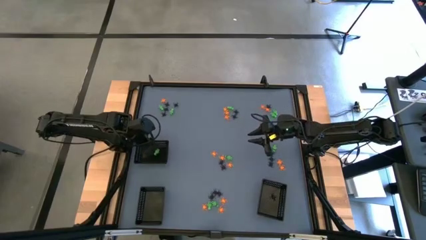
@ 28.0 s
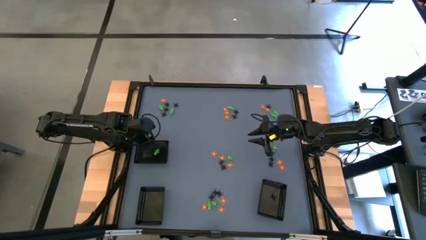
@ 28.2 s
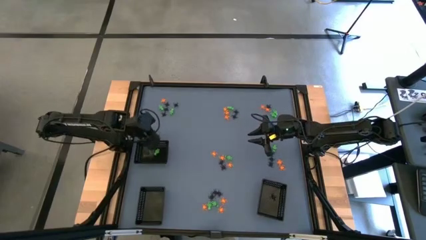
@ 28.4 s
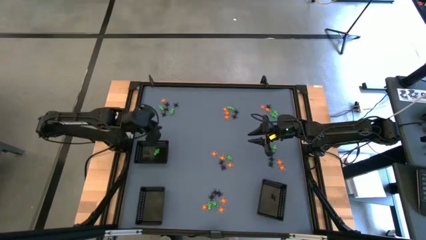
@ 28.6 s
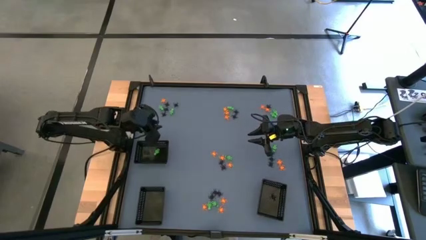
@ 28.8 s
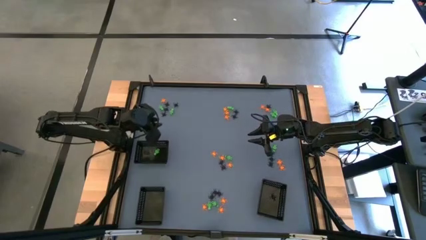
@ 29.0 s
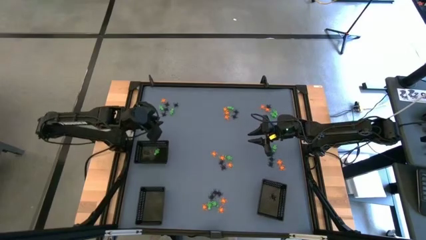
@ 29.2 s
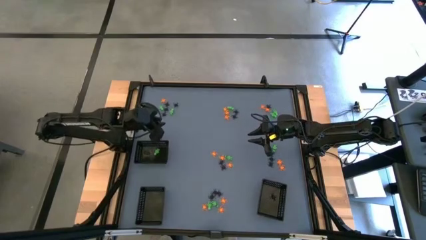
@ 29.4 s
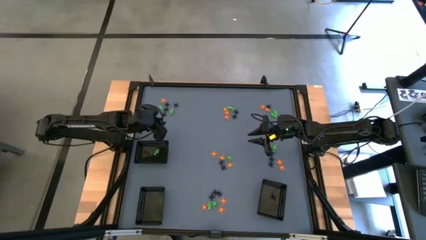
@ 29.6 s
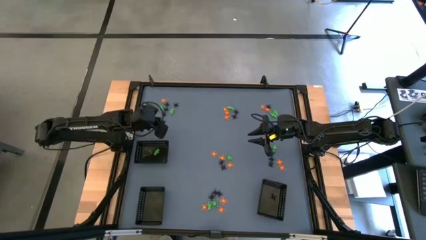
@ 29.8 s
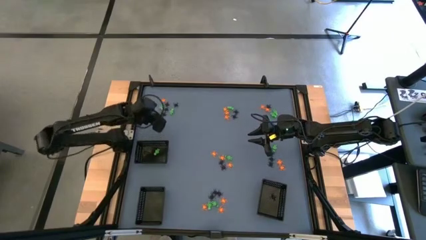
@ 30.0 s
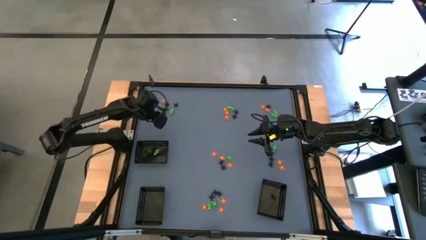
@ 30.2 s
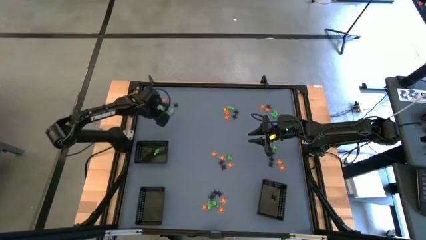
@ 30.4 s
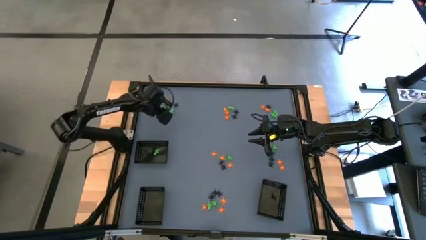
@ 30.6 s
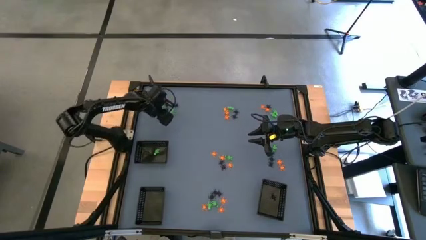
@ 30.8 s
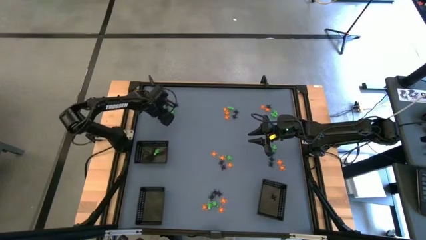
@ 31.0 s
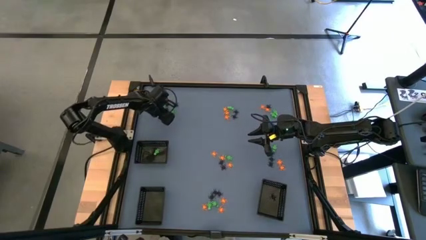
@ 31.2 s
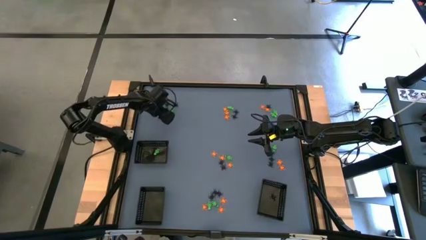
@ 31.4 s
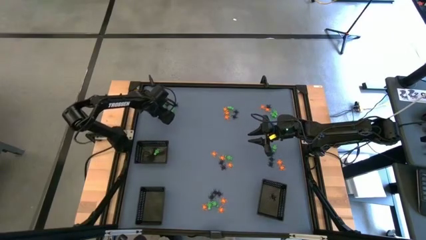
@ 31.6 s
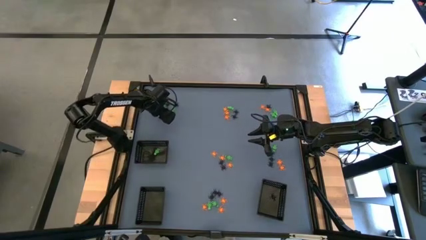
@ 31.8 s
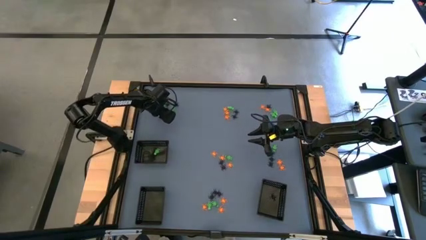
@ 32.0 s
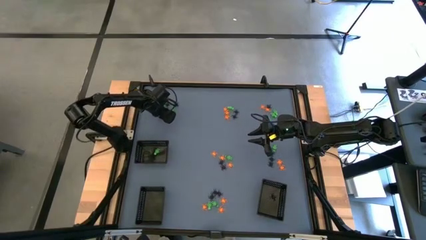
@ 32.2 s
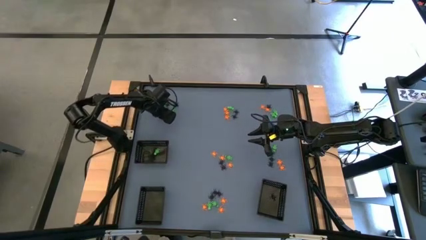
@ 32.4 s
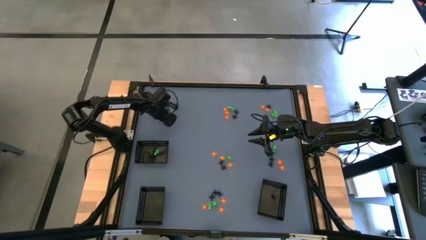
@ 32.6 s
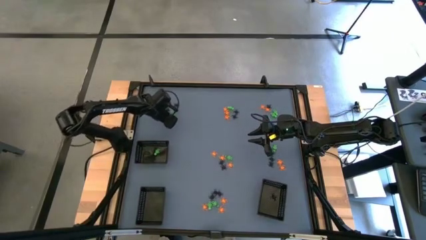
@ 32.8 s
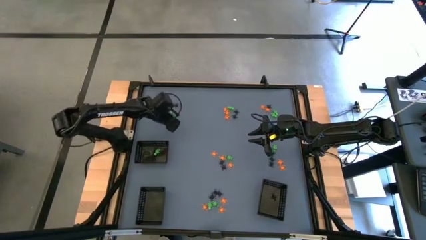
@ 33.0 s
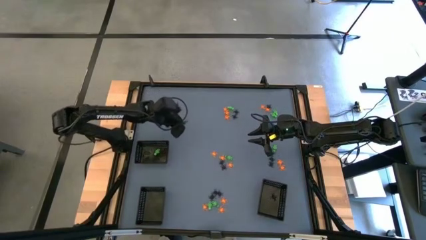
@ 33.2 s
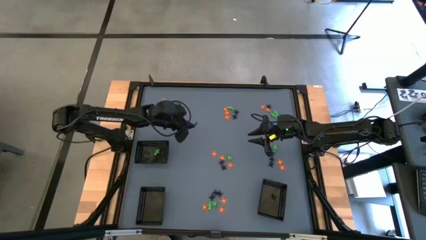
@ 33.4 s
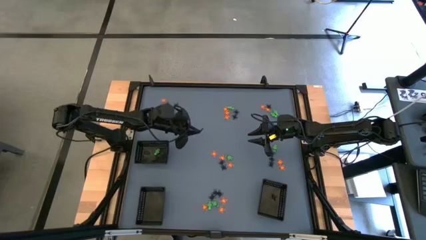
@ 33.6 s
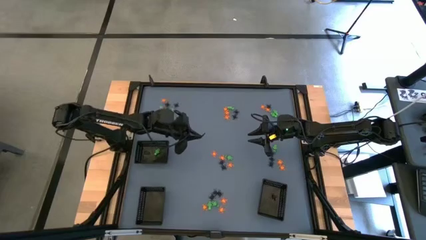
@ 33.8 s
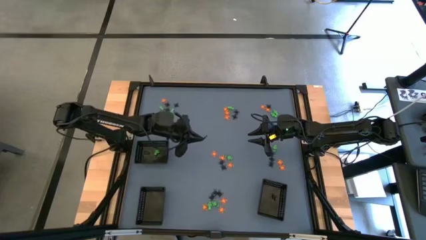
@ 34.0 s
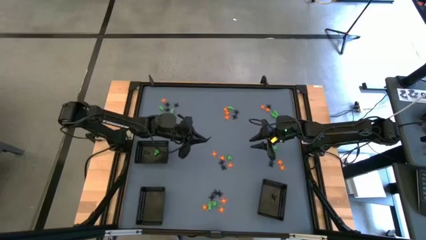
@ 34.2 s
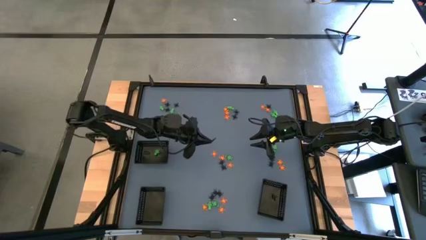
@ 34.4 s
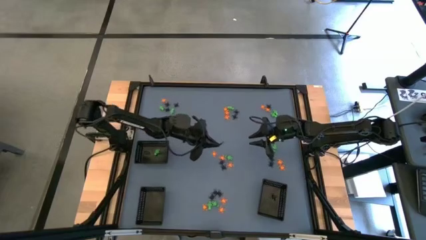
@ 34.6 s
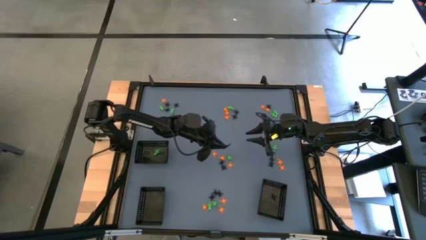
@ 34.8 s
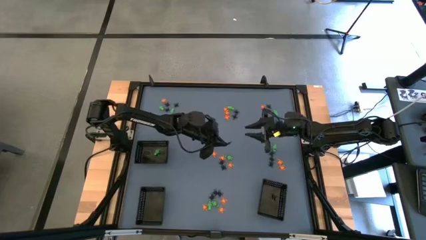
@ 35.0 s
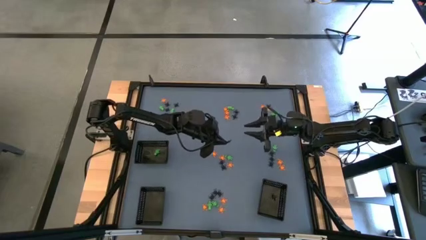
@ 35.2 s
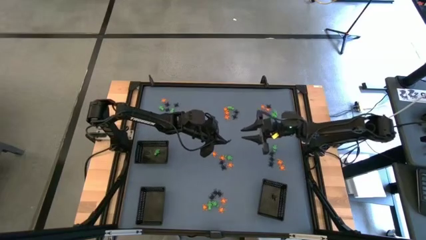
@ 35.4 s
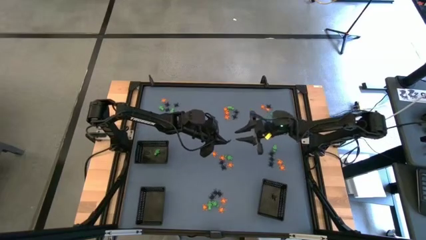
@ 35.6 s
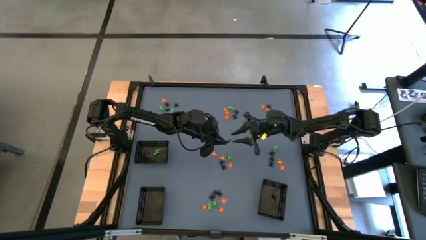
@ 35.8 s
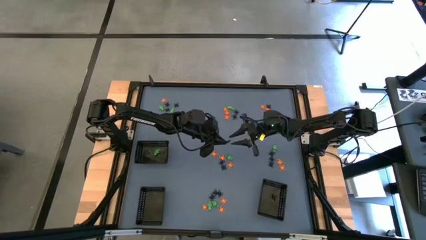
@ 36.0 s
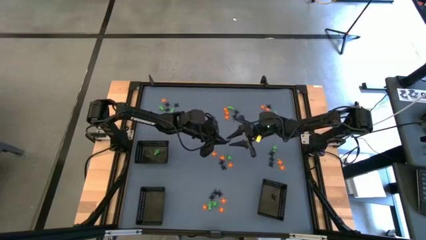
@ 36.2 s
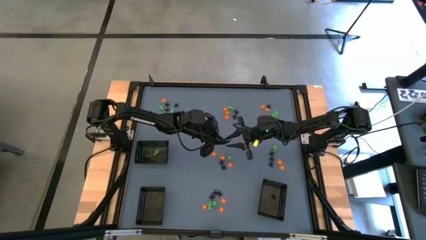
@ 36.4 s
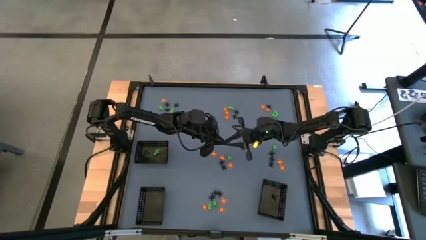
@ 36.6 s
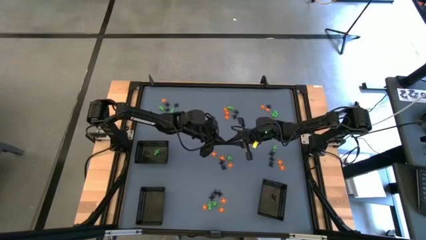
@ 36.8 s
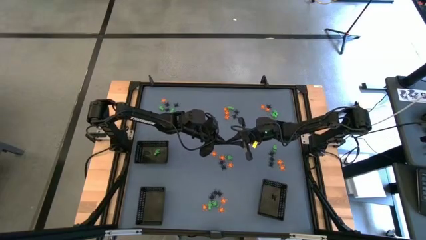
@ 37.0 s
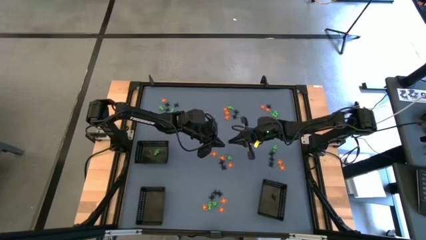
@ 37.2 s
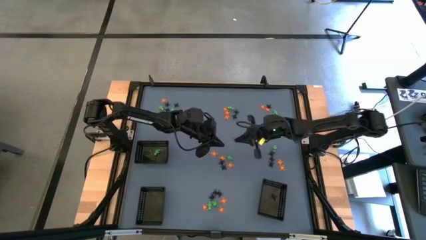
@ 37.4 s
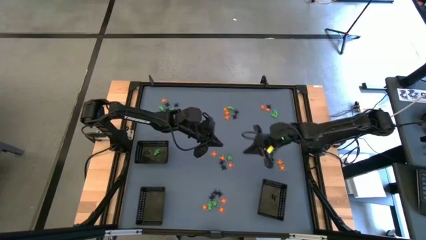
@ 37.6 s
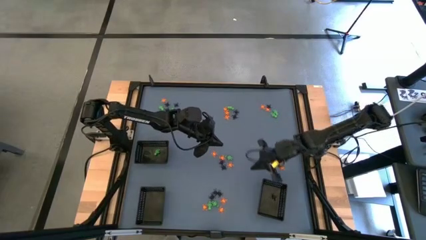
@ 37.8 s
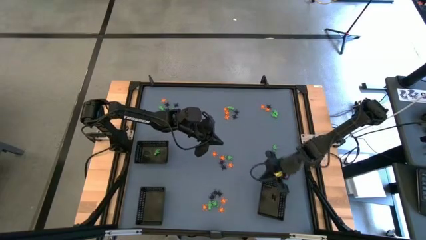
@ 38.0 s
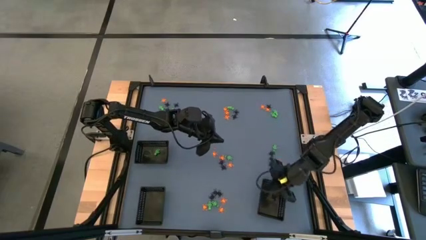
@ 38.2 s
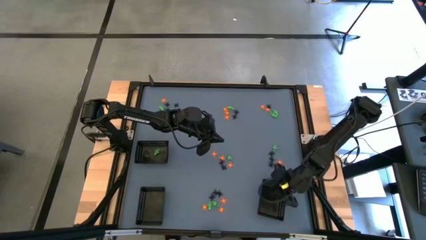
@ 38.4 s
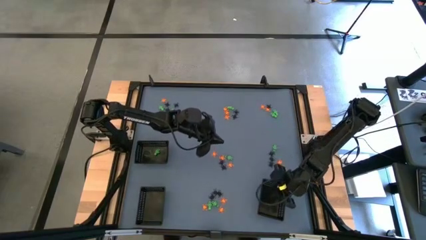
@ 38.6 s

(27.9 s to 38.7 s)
Task: Sort Halloween decoration
Put the black spider toy into the bottom right black bin

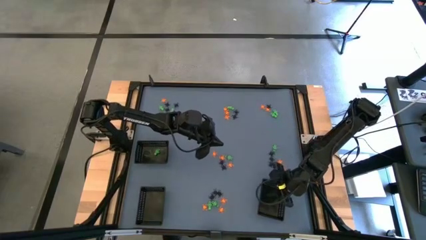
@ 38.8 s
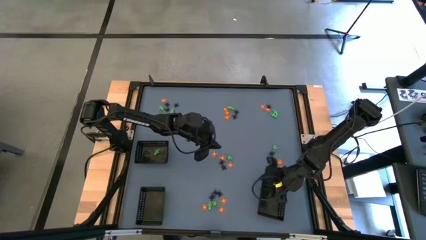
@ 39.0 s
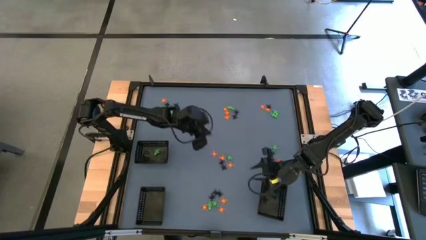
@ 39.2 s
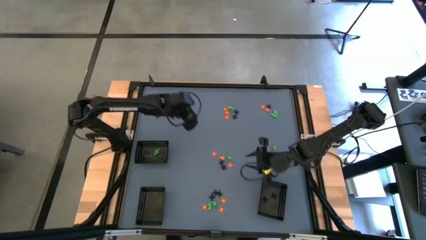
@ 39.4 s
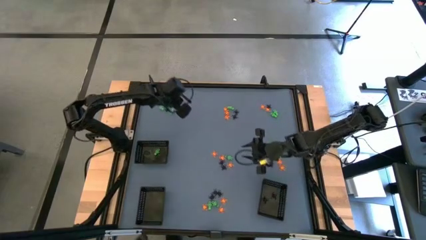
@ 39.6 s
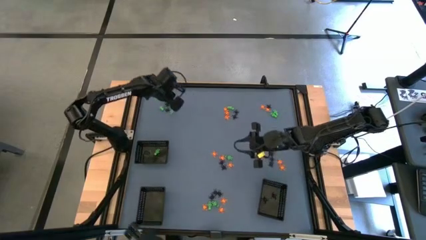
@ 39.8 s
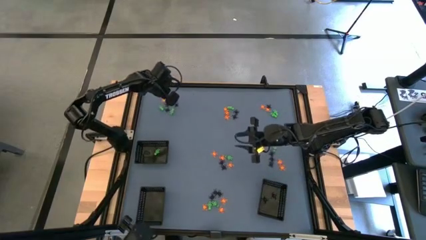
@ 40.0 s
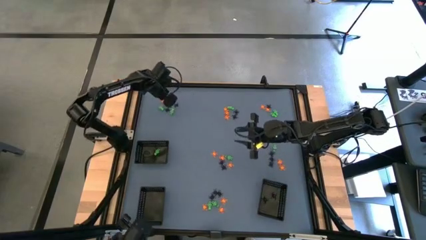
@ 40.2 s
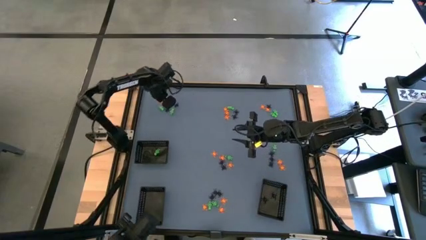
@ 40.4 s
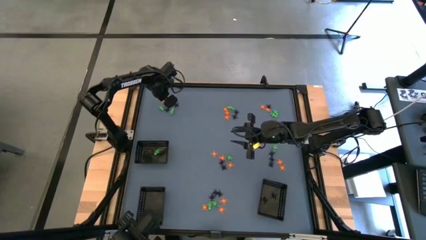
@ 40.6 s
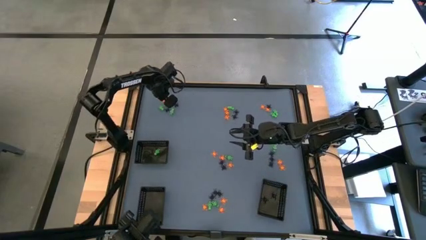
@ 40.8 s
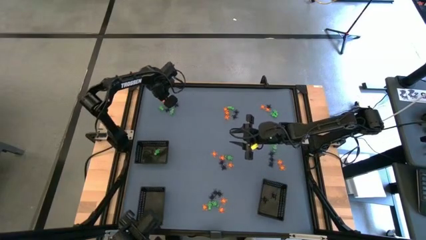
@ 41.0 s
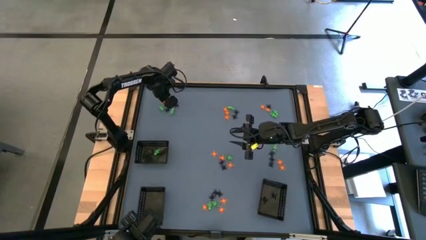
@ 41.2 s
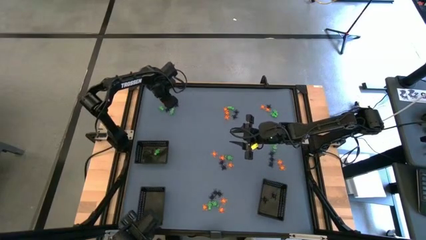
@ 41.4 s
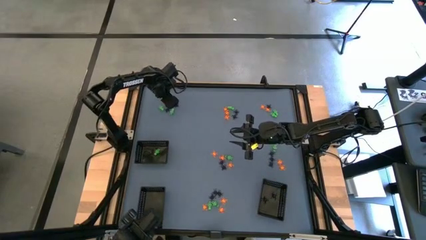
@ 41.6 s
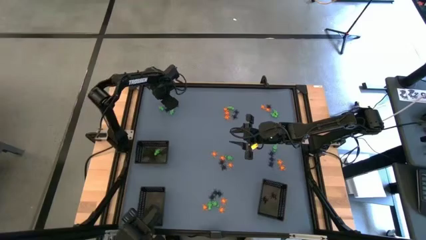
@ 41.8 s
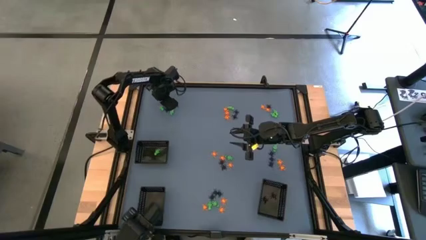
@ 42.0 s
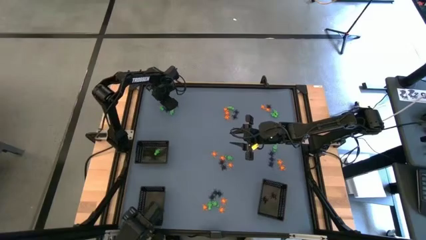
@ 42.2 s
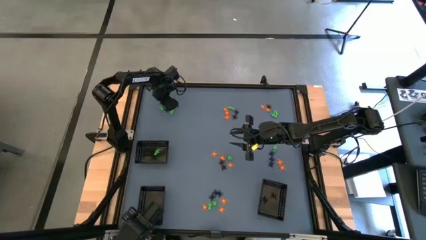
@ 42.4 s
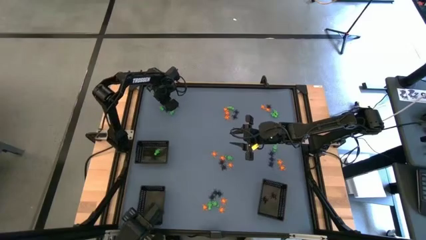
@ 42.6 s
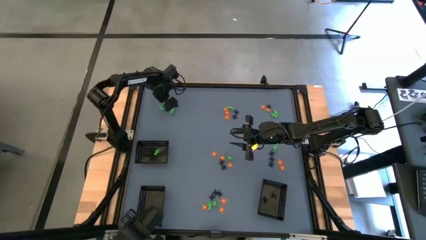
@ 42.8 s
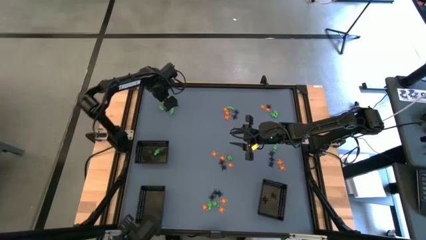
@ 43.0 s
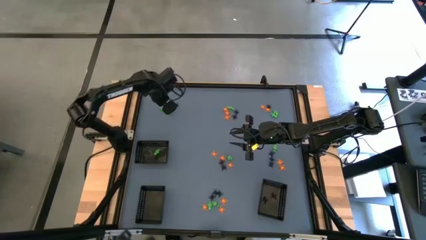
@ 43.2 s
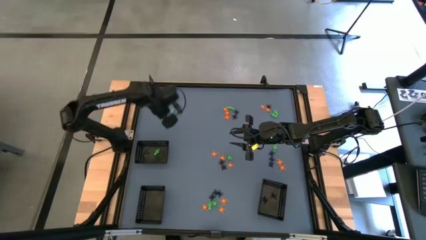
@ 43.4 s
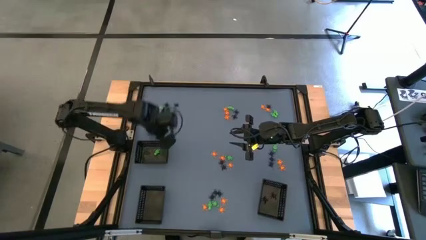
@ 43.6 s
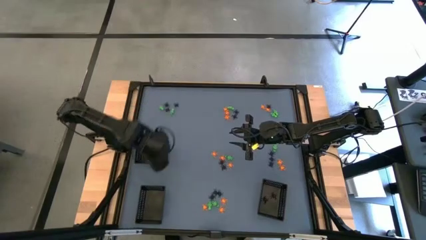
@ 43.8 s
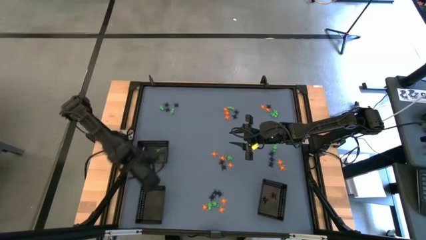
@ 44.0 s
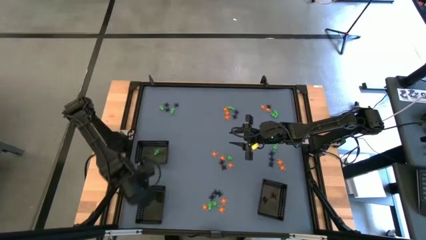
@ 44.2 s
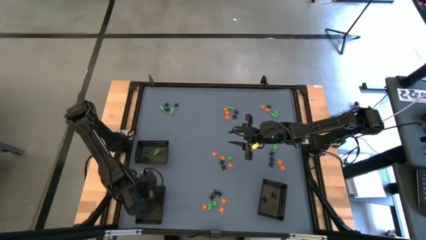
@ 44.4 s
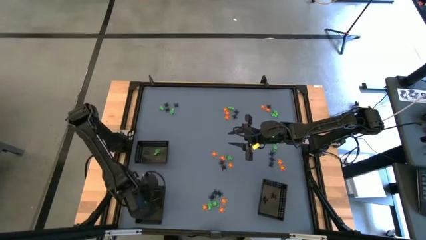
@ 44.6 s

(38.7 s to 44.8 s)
Put the orange spider toy into the bottom left black bin
